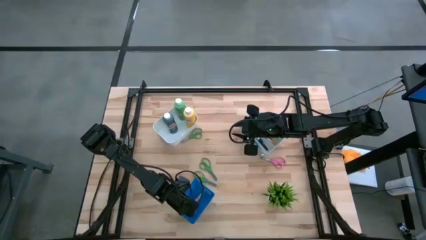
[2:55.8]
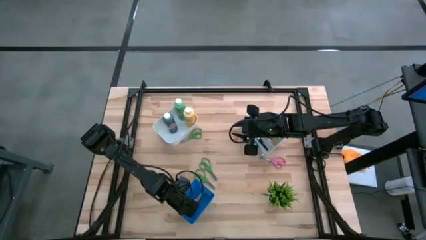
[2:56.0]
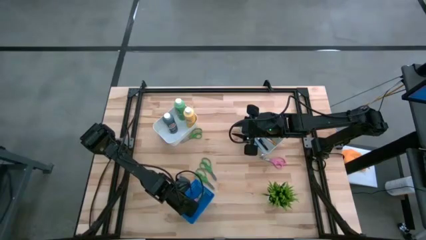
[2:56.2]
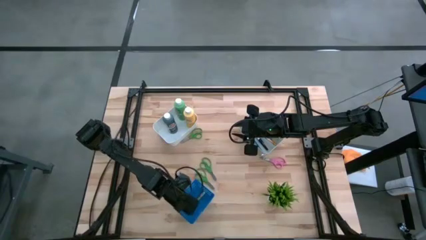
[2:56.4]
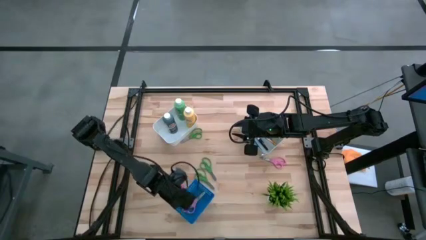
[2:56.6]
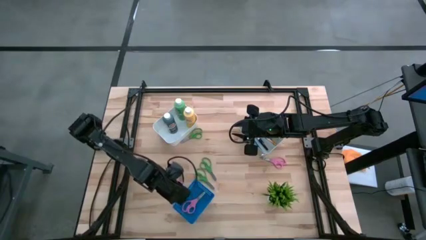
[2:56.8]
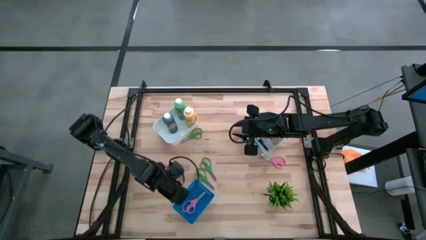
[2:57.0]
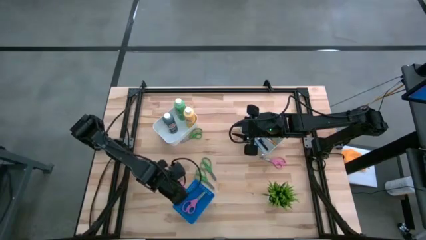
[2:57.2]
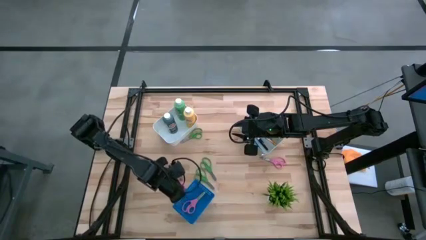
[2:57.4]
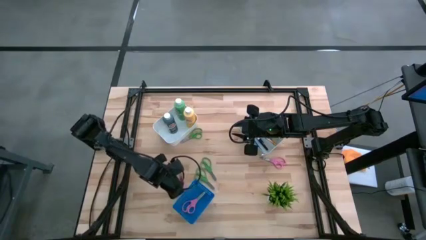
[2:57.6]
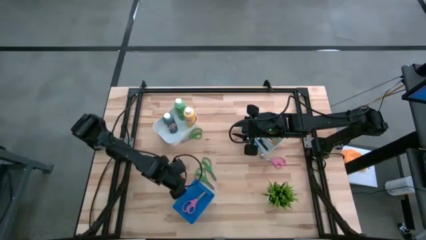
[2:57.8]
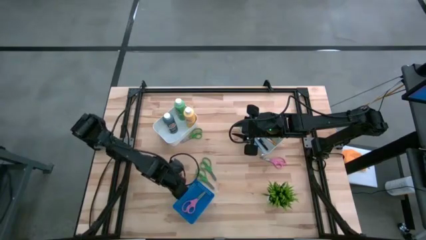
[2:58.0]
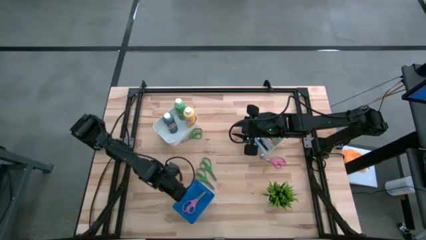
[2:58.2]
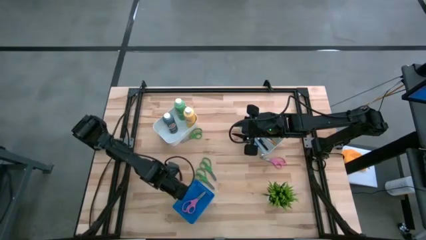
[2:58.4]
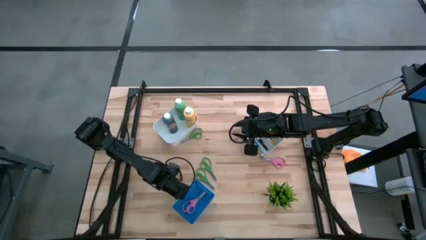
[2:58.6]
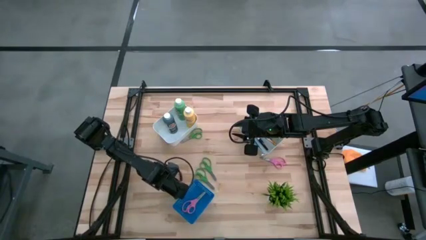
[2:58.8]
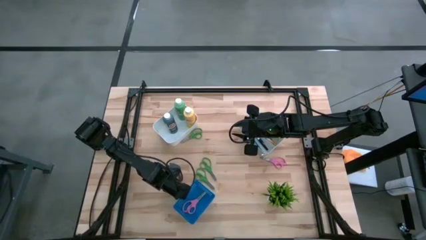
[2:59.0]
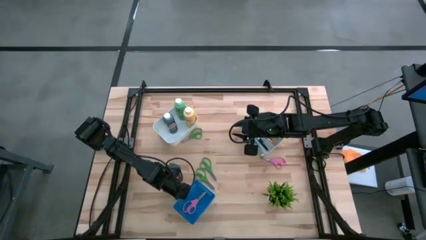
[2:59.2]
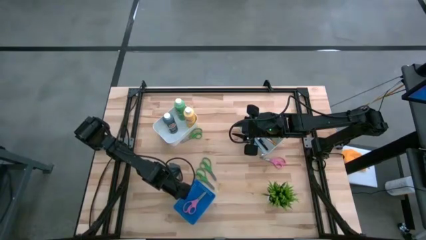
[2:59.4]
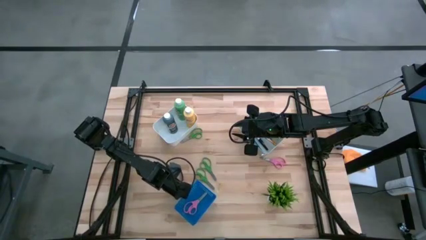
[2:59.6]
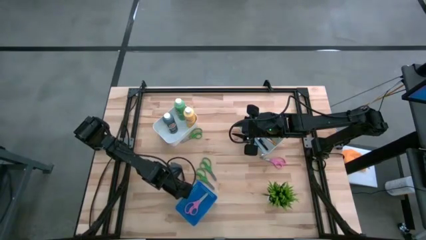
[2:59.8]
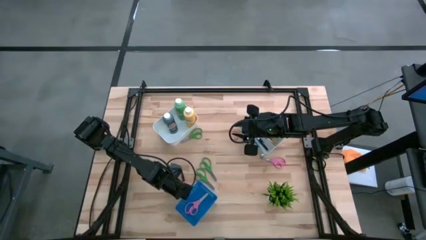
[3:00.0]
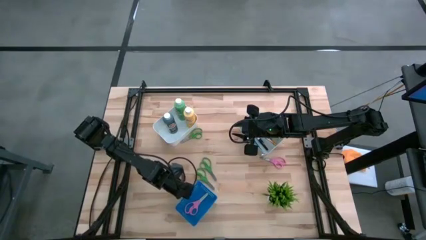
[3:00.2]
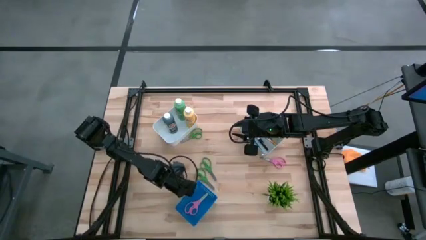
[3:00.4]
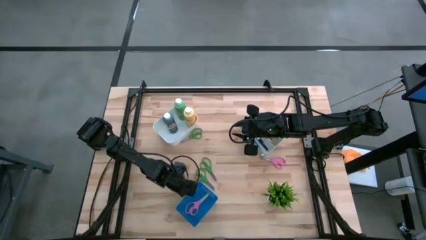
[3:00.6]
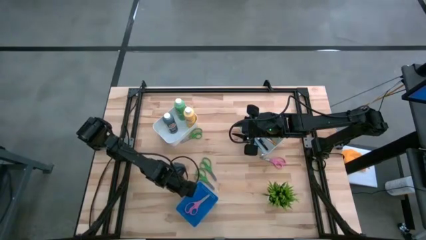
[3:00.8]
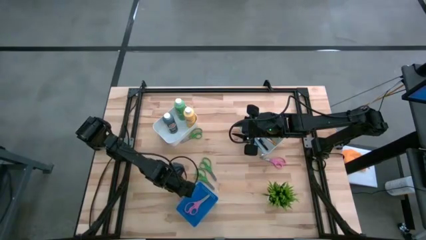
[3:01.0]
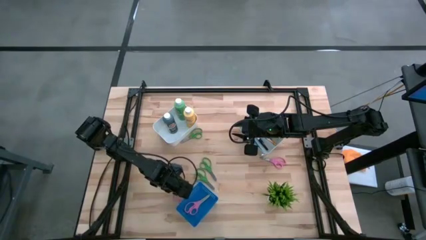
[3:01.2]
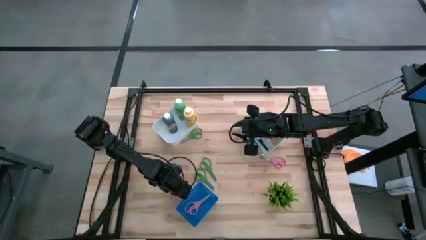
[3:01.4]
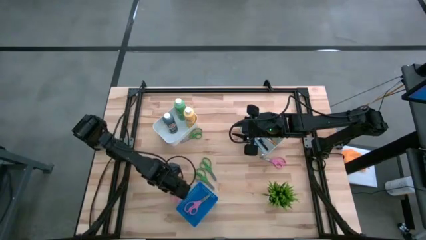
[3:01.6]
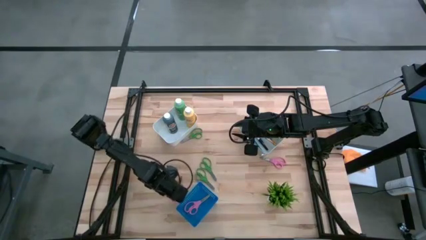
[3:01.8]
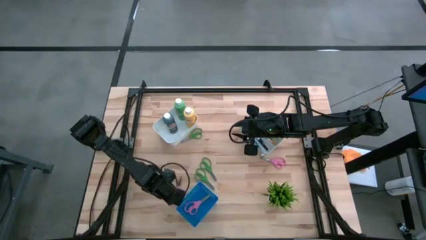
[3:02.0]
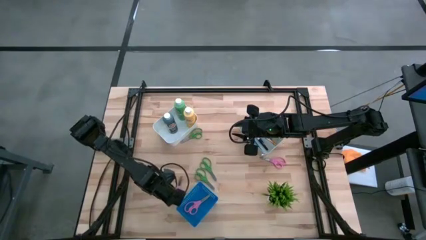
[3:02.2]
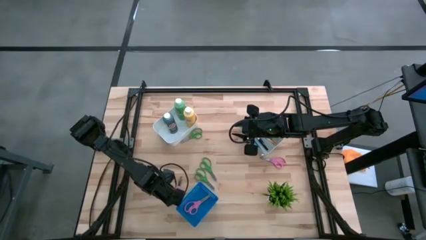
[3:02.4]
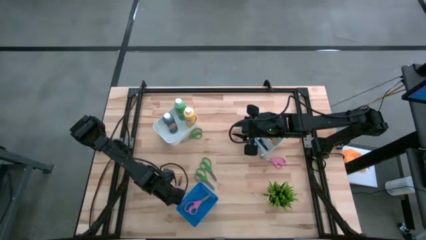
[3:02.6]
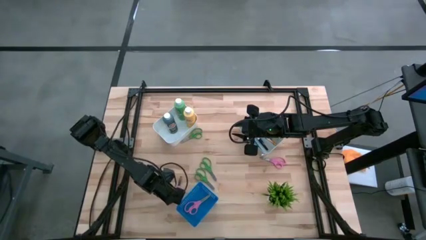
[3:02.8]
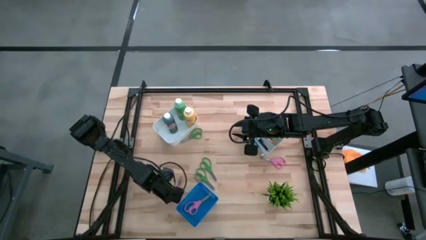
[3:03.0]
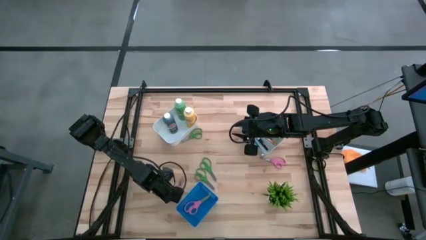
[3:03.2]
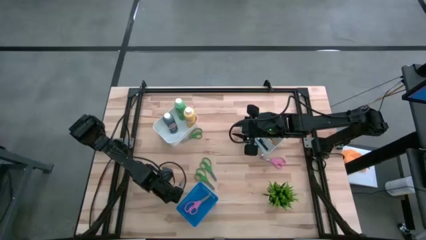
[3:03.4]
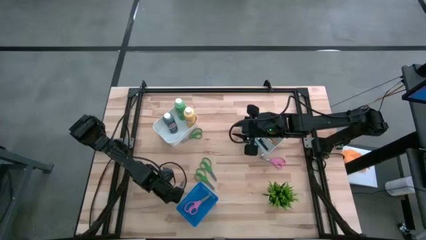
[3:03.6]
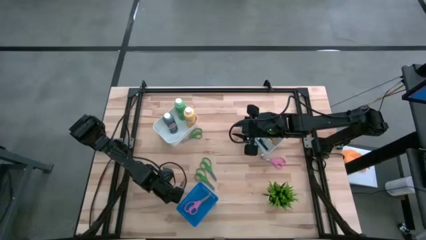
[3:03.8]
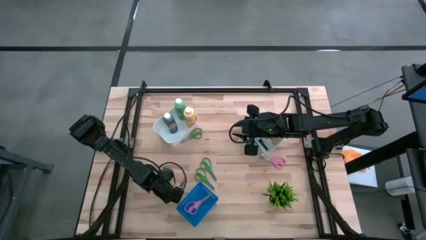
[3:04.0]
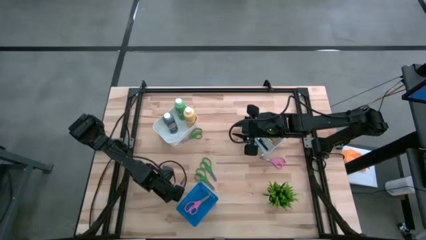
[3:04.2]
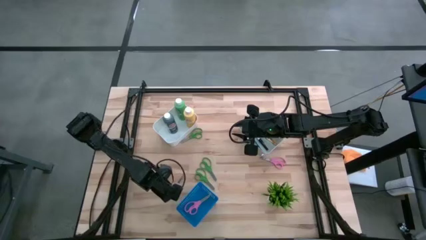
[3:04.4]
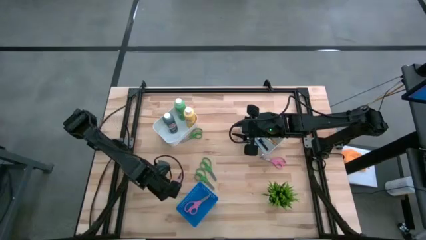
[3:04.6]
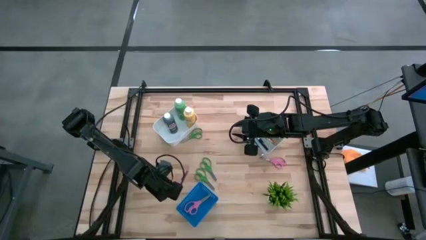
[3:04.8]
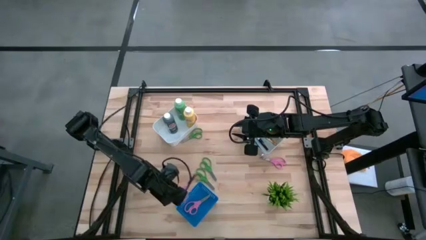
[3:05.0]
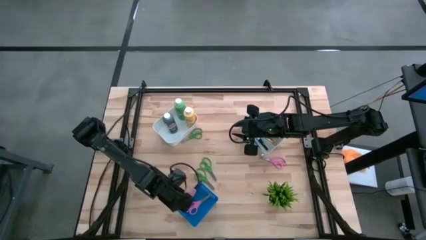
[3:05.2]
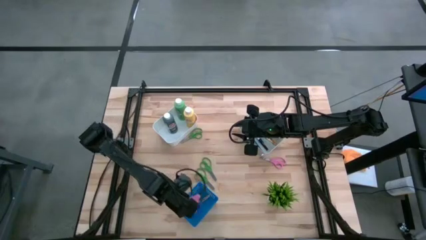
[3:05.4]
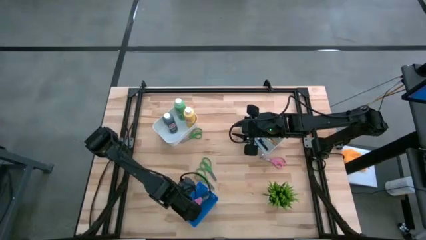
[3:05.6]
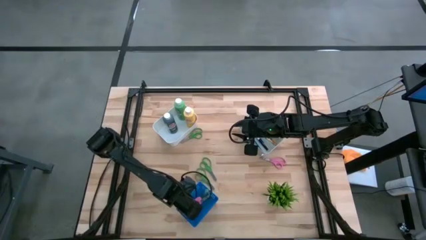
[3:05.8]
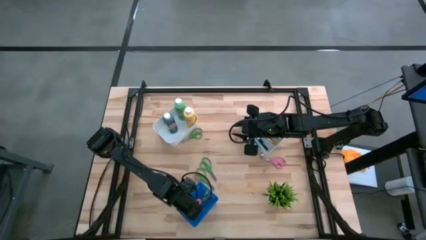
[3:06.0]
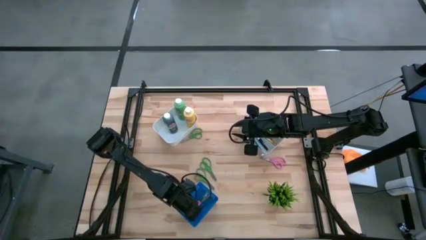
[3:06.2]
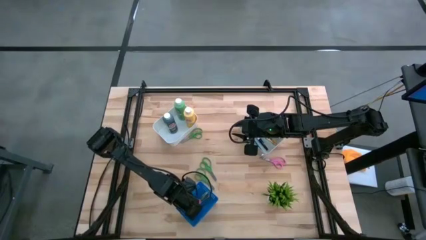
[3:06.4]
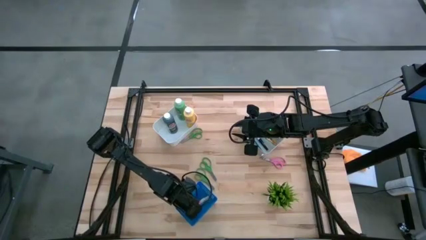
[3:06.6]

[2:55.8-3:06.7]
Task: Pick & Place Paint Supplies
Put the pink scissors into the blue bin

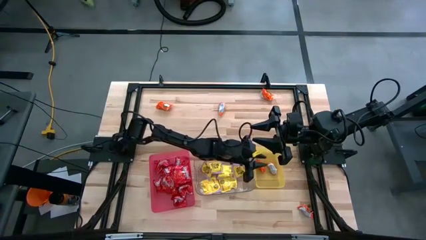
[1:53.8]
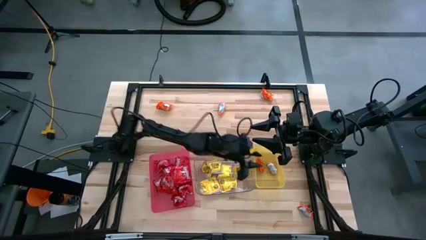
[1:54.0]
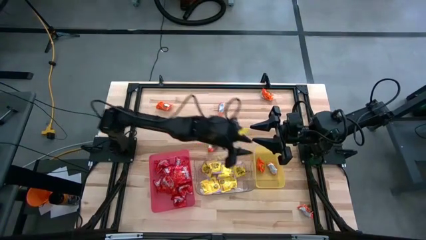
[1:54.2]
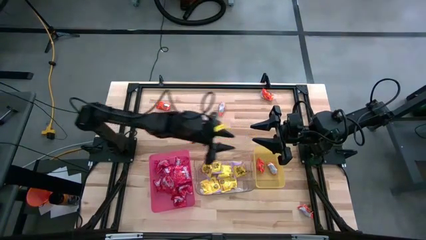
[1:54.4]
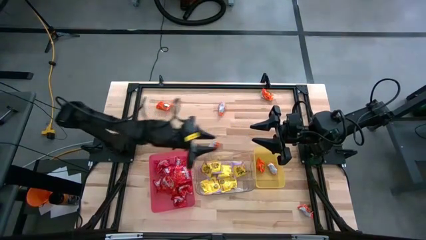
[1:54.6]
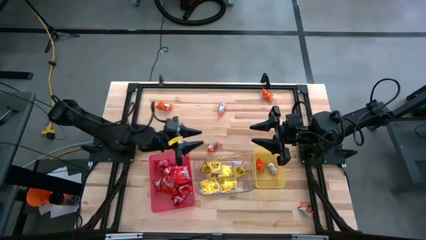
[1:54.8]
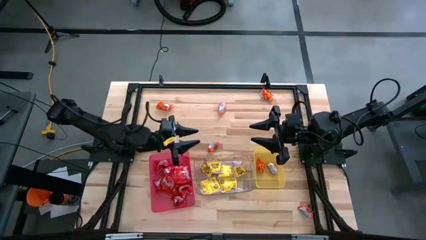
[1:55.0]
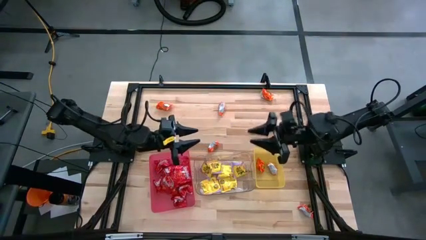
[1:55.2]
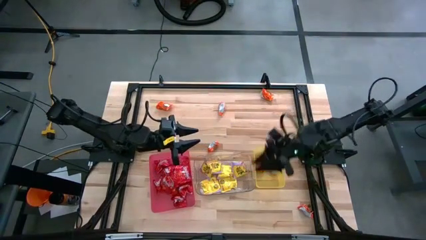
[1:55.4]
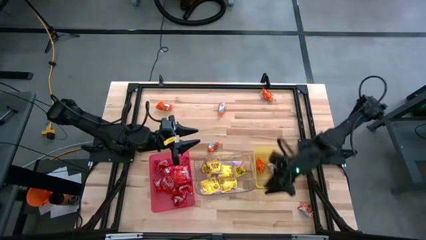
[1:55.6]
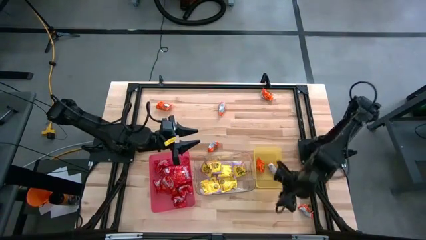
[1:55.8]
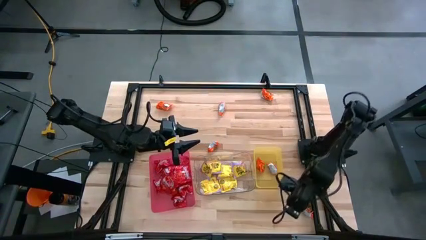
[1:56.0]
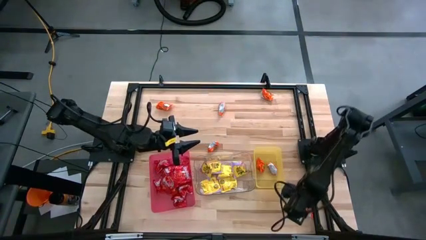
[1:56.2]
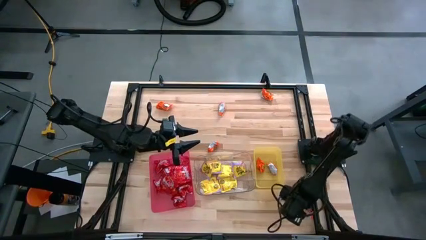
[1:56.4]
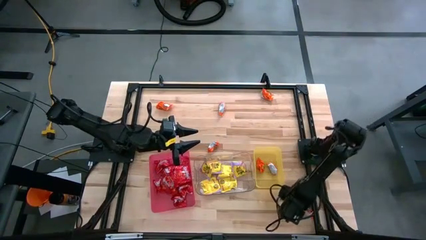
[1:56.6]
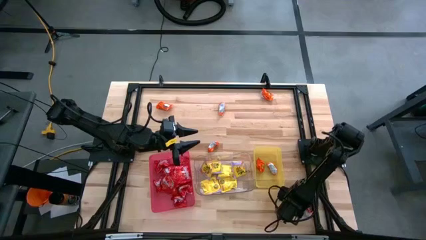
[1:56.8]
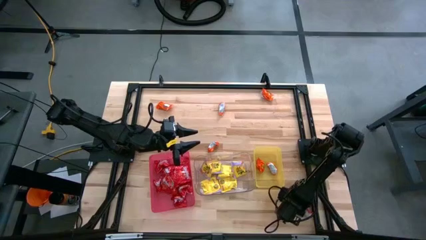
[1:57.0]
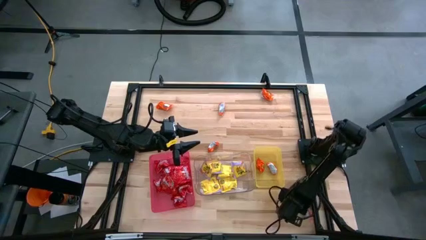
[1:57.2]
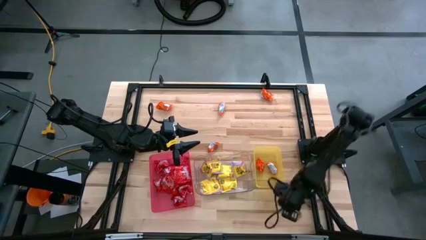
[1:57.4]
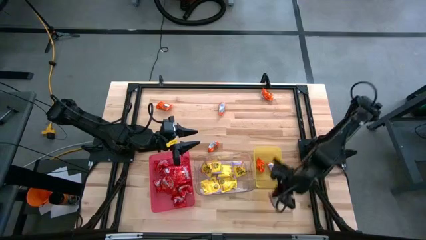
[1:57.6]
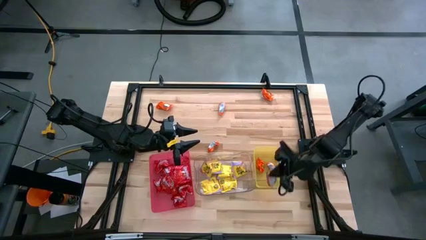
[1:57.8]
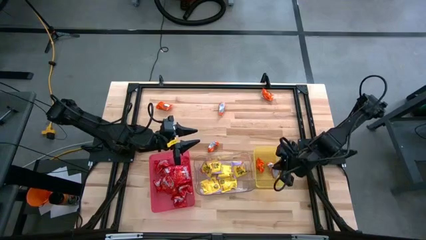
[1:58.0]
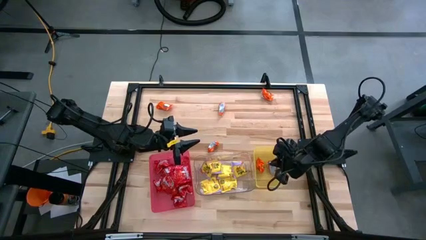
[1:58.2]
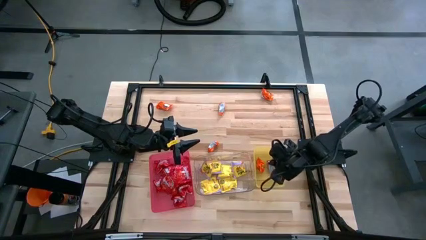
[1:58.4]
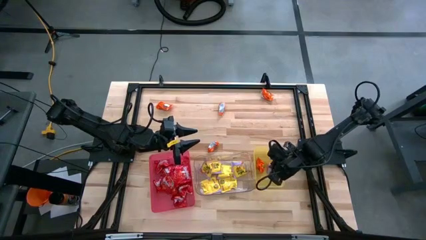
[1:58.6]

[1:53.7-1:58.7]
Task: Sort candy
Put the orange chocolate into the yellow bin
